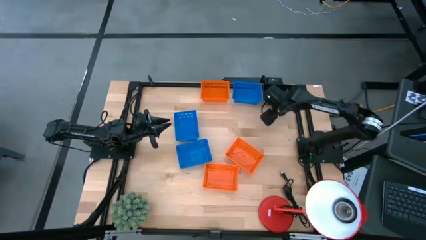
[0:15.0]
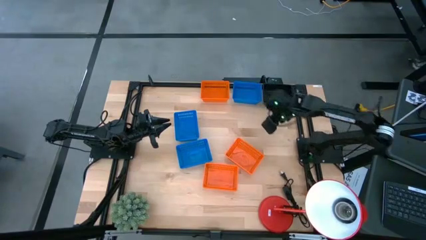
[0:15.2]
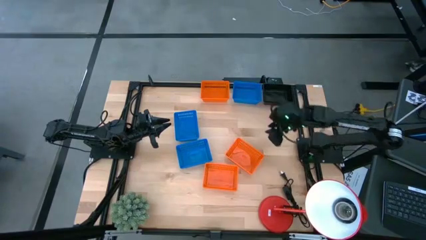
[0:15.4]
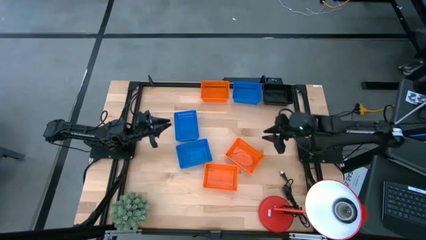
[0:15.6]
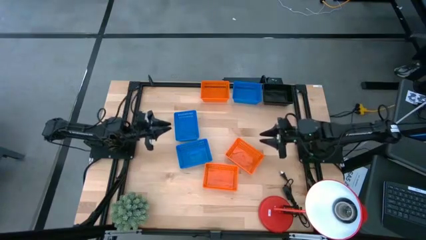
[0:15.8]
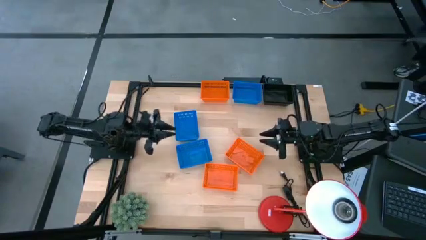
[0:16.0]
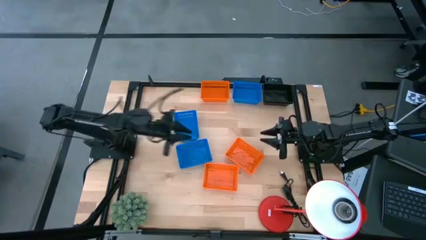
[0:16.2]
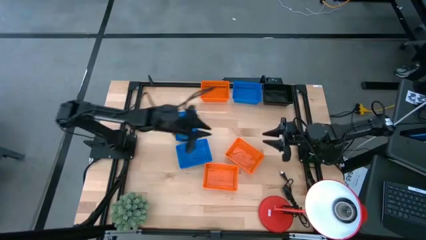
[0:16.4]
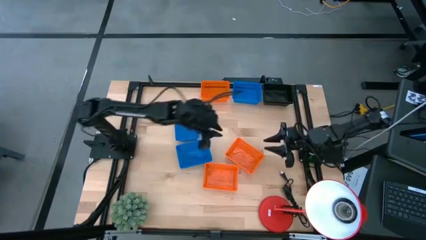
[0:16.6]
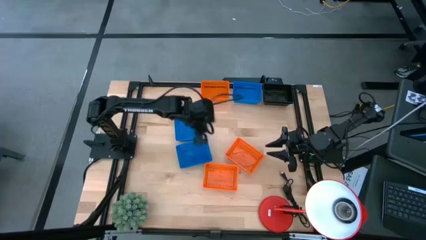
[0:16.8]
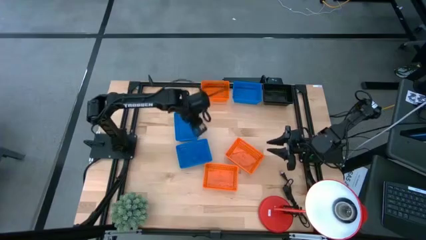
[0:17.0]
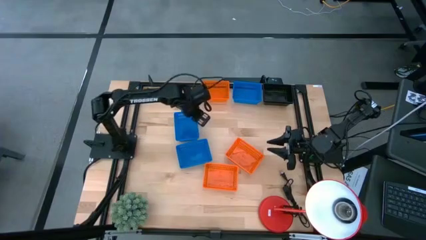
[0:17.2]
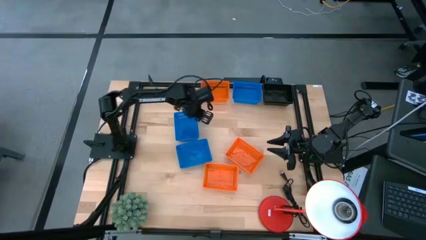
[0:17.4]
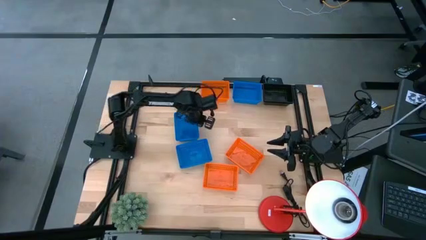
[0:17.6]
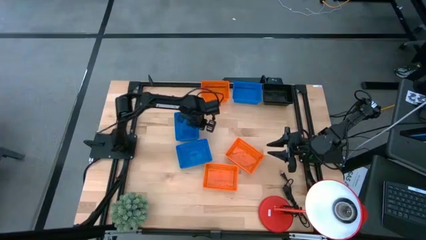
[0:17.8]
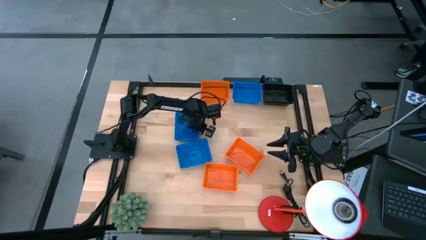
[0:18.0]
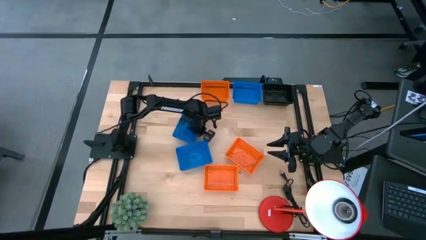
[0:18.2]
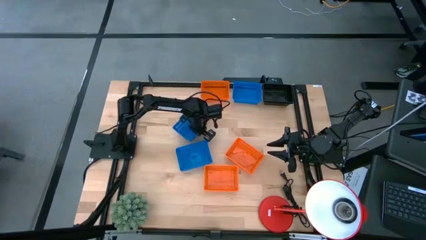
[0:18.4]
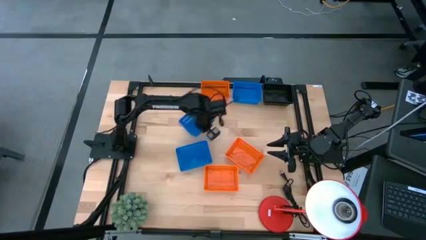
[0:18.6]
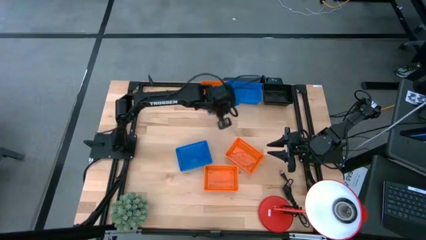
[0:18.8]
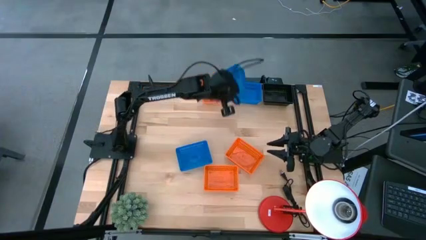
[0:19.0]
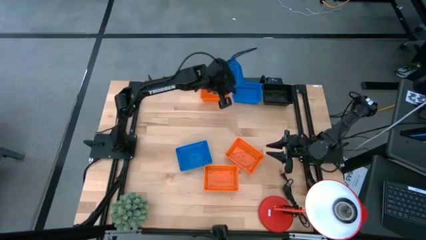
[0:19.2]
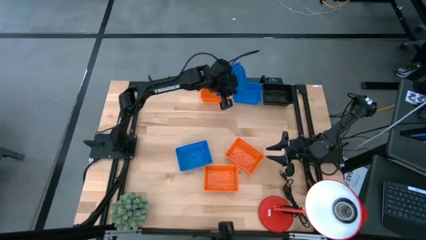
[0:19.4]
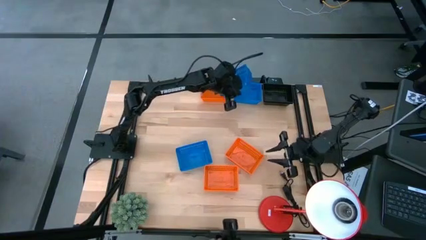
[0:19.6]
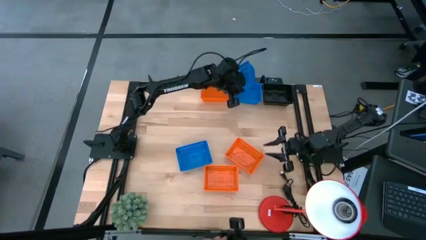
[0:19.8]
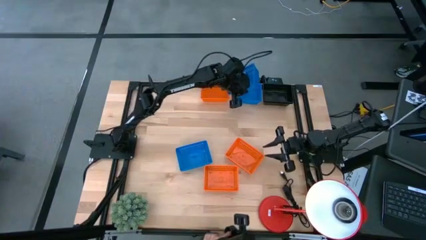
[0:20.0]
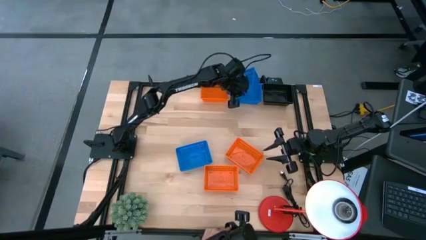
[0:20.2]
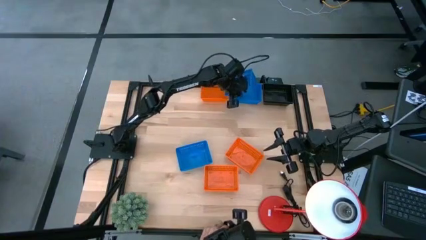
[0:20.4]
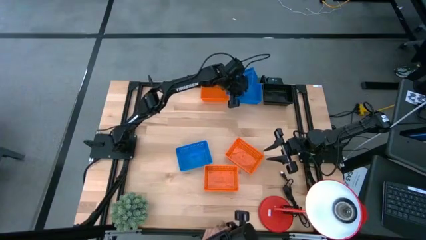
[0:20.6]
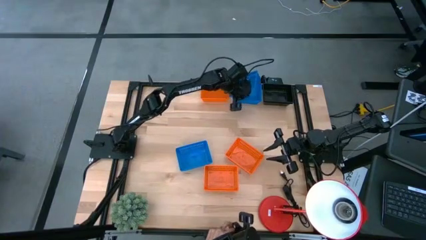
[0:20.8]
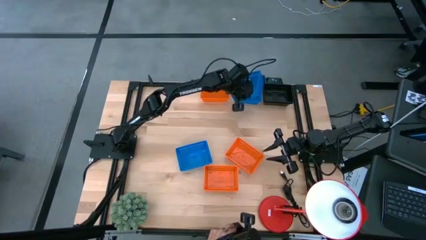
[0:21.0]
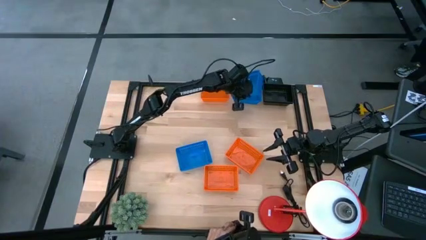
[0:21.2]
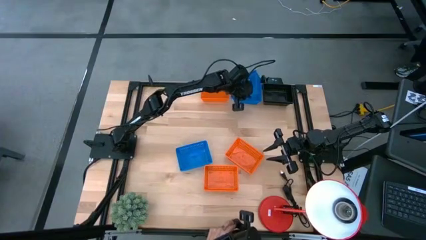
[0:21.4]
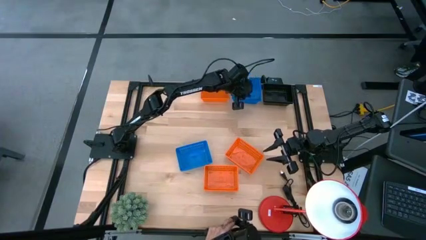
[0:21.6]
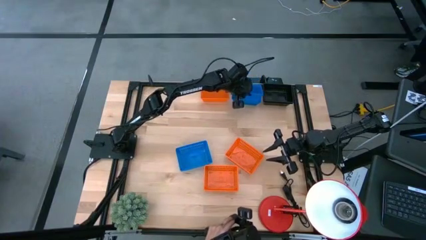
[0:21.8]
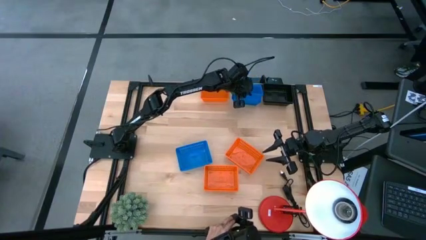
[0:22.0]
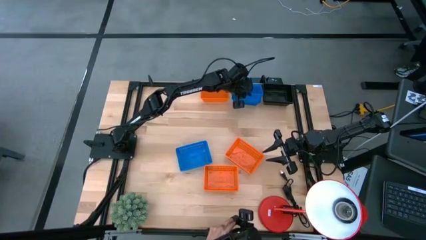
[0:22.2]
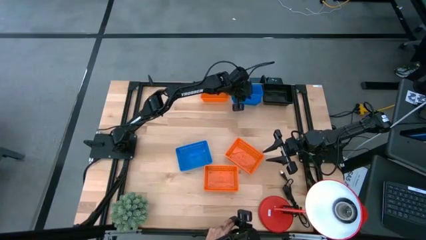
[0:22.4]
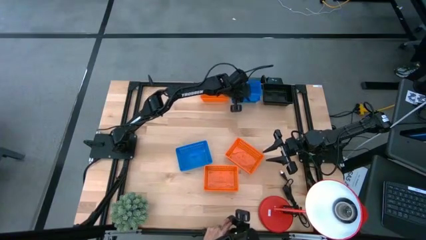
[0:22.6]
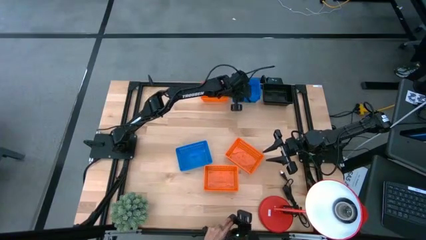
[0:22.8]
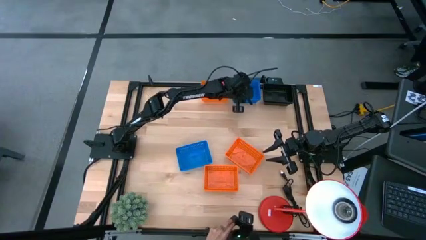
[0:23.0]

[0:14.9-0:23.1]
Stack the middle blue bin on top of the top blue bin

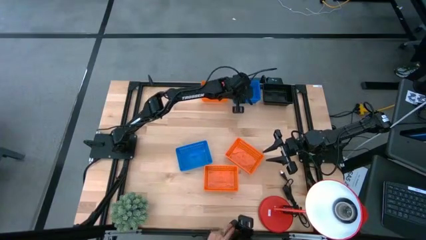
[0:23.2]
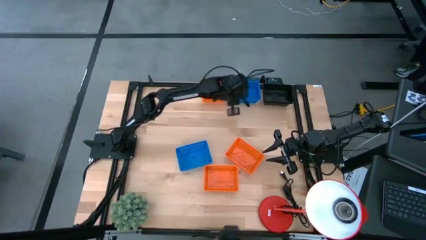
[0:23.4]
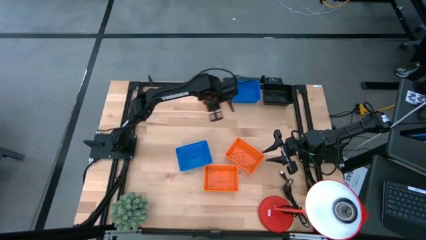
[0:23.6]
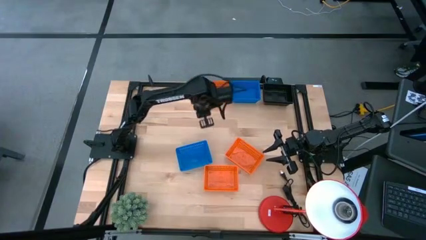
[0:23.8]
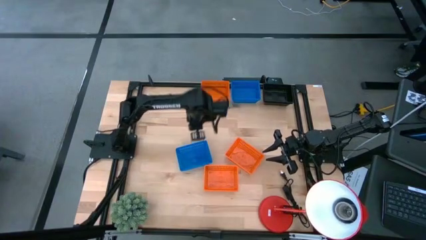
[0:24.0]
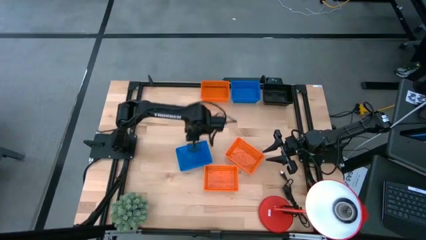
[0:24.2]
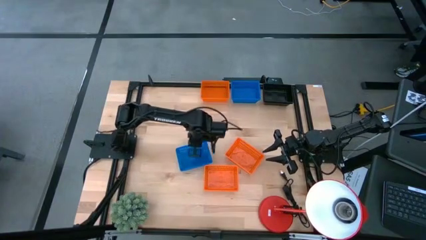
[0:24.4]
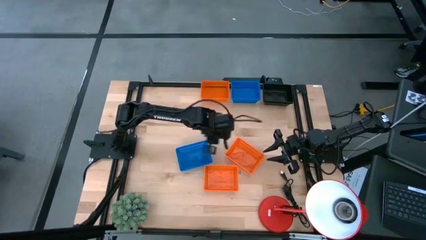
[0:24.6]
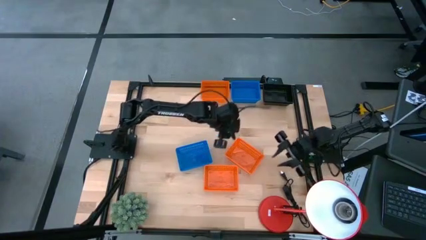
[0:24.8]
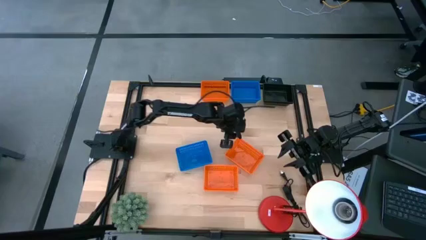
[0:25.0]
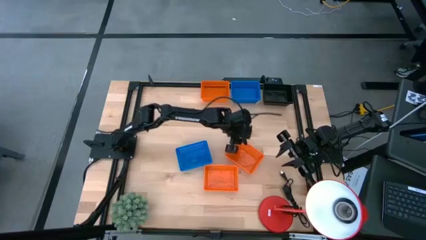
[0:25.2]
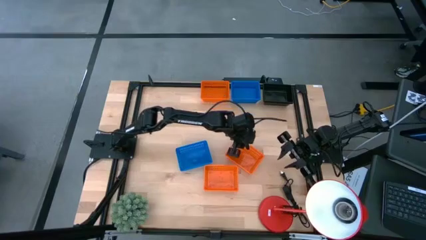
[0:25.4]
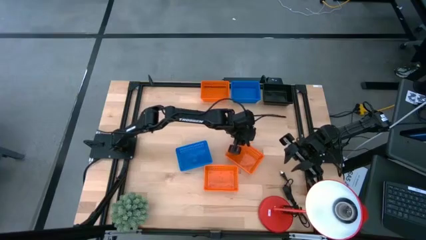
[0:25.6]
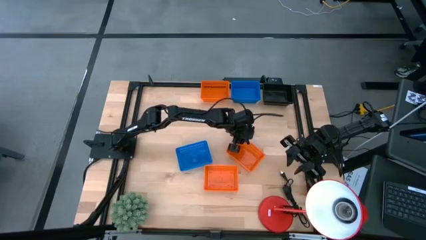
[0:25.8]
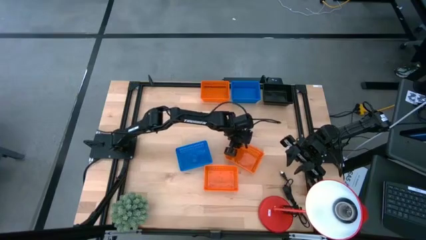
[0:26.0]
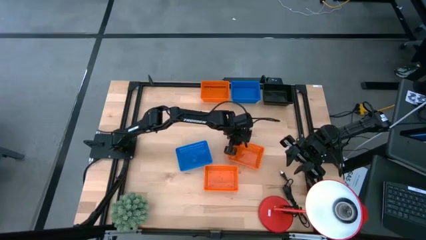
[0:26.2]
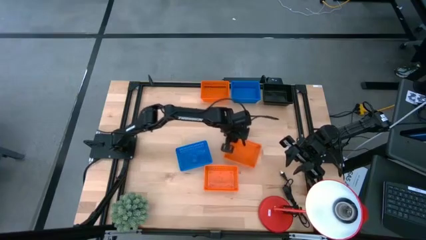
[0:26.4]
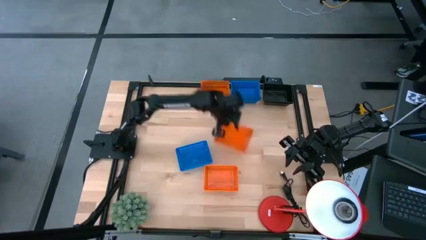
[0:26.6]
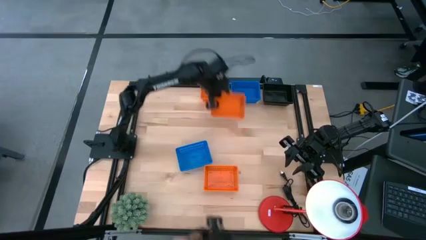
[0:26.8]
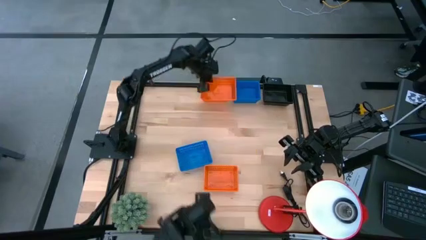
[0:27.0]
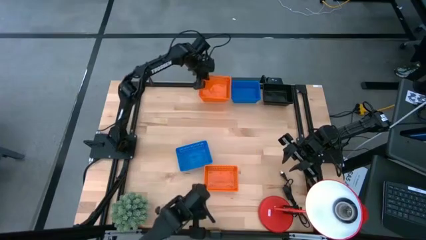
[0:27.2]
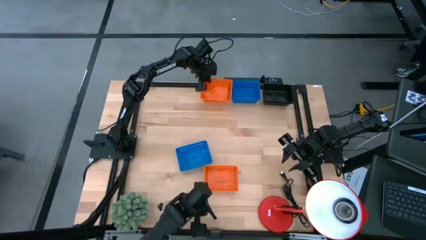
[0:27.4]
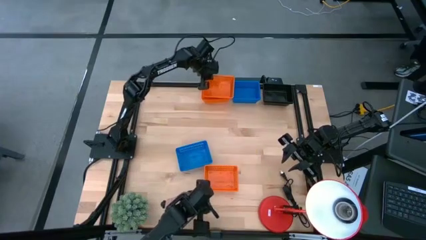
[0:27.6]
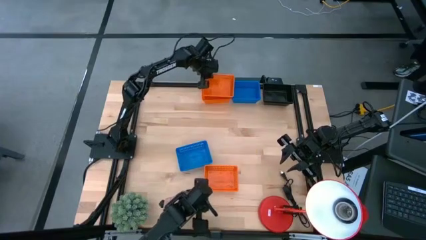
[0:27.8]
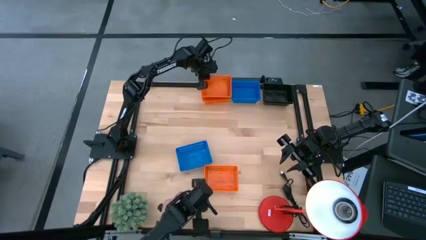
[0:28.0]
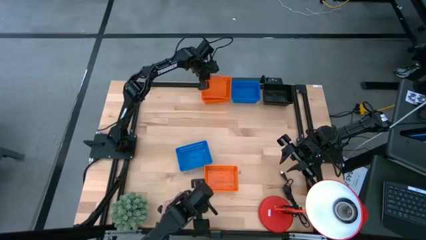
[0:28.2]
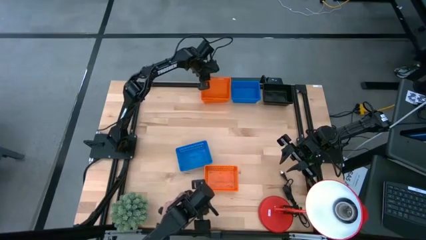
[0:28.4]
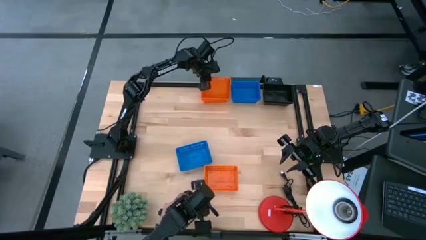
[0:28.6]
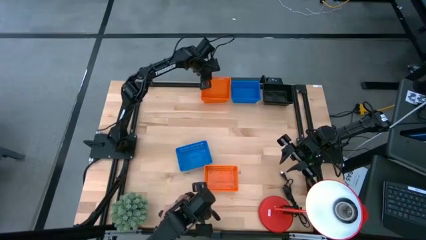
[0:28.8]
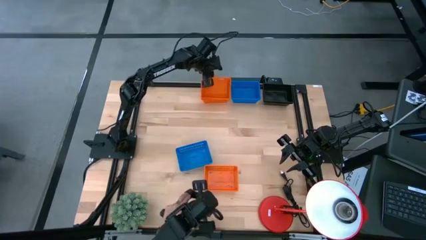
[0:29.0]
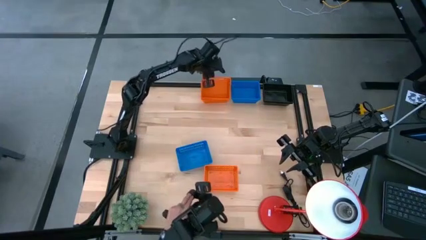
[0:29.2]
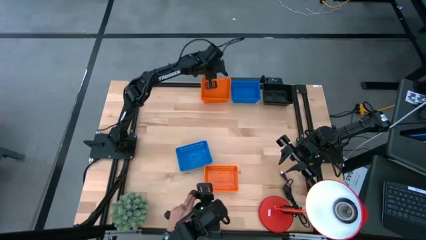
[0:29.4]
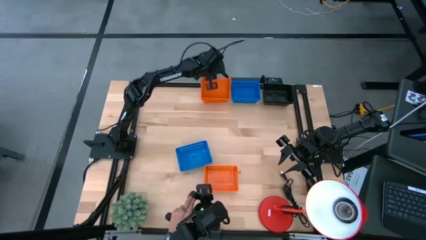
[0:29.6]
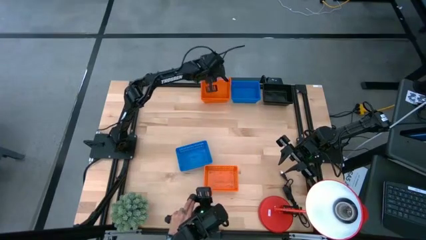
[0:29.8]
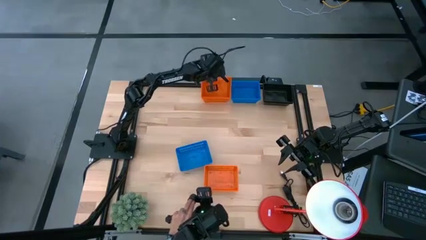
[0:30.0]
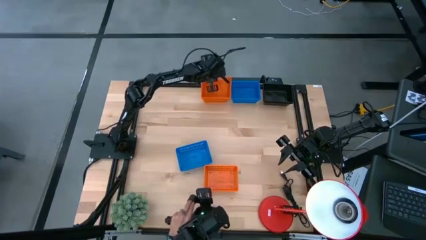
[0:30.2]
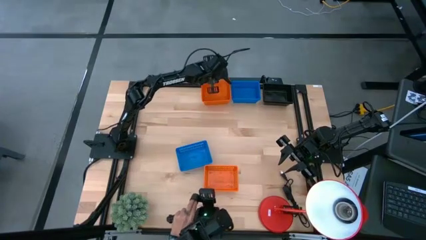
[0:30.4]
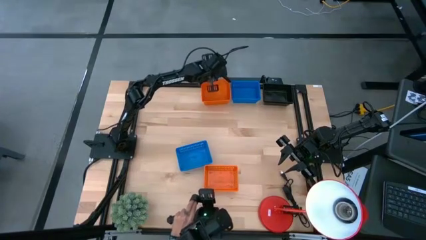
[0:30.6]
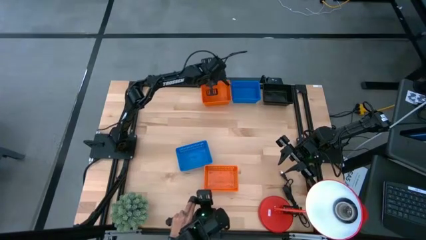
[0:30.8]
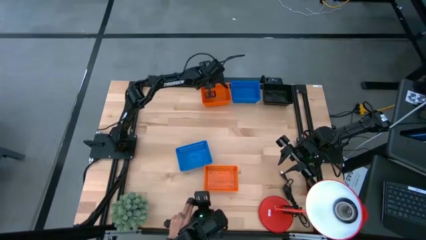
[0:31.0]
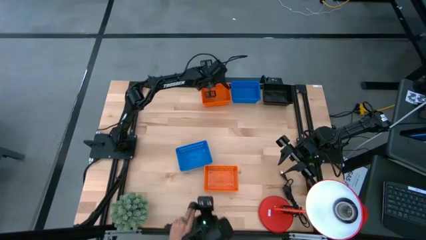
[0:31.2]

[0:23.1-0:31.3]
Stack the middle orange bin on top of the top orange bin

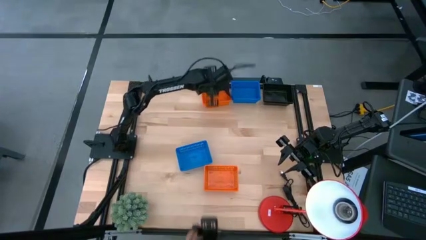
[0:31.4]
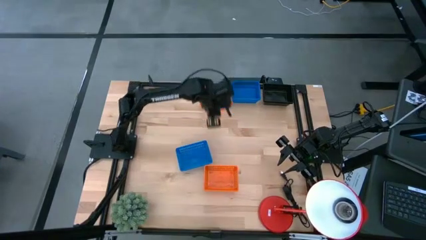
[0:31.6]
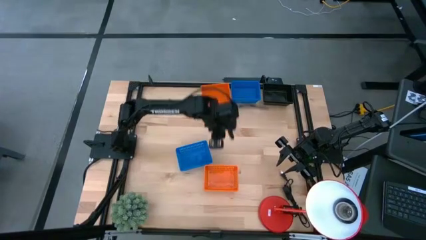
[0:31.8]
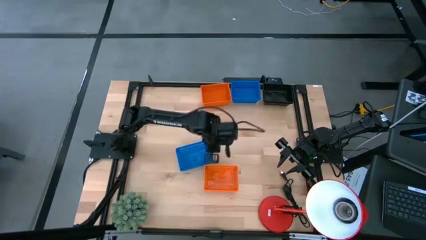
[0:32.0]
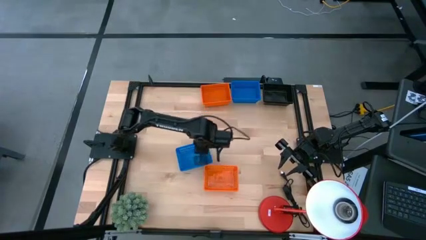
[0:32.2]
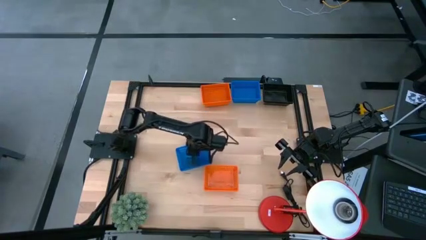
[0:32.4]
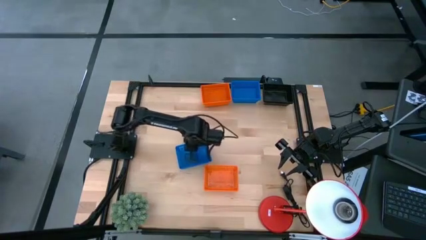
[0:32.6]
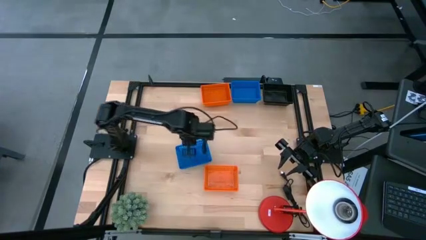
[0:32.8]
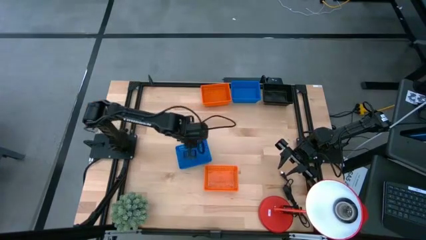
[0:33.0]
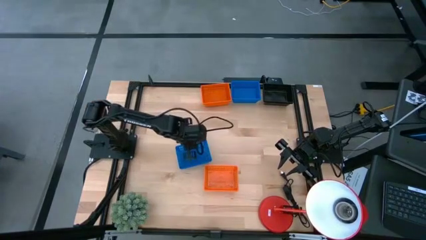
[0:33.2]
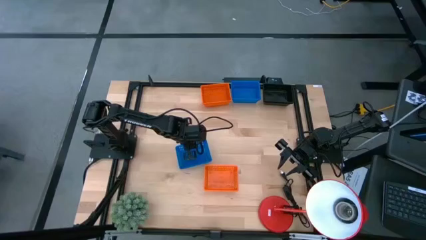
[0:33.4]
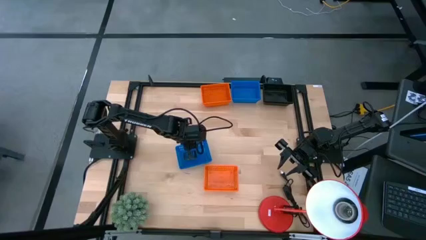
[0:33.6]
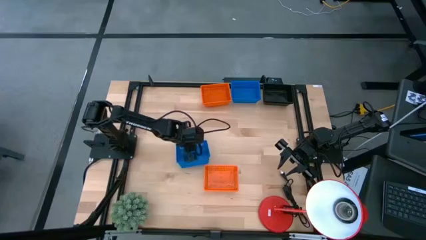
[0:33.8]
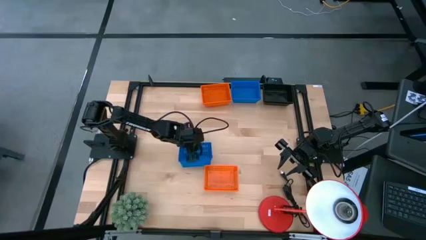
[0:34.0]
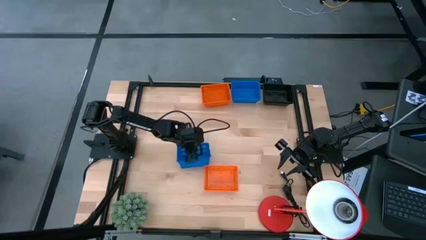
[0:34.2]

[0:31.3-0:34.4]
Stack the bottom blue bin on top of the top blue bin
